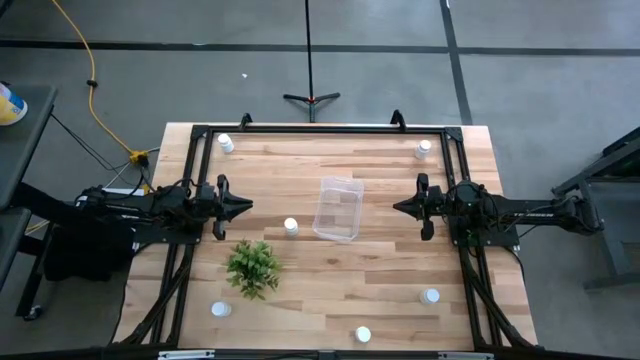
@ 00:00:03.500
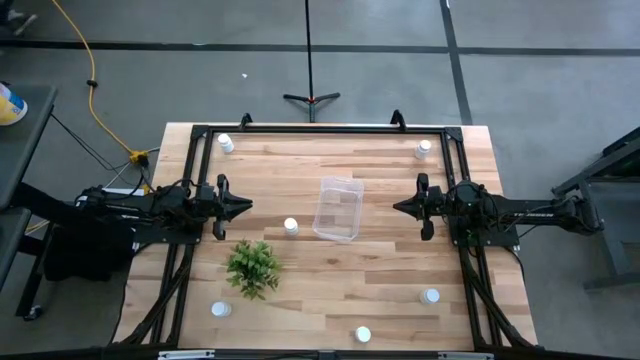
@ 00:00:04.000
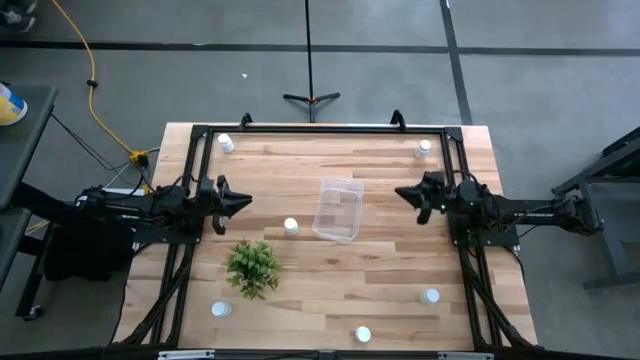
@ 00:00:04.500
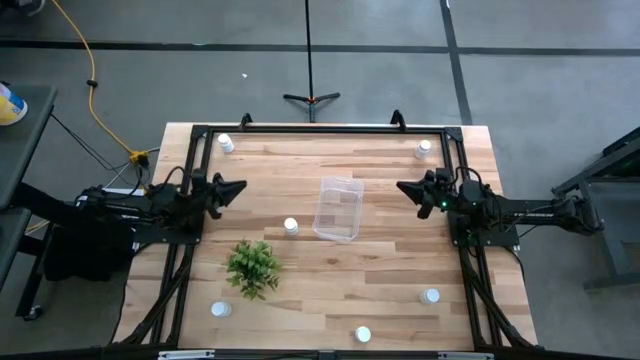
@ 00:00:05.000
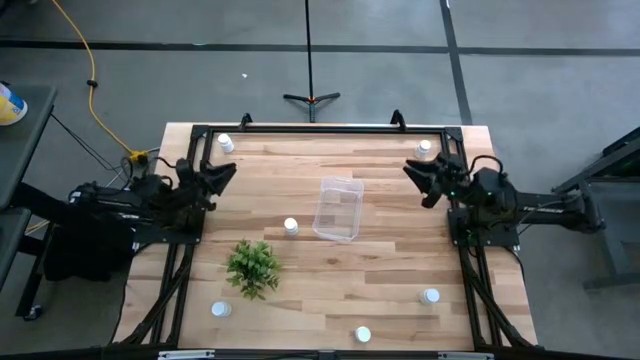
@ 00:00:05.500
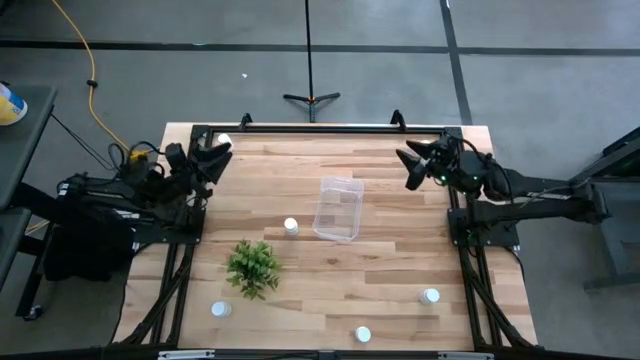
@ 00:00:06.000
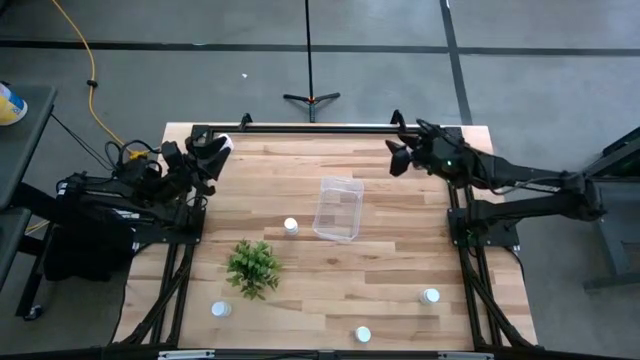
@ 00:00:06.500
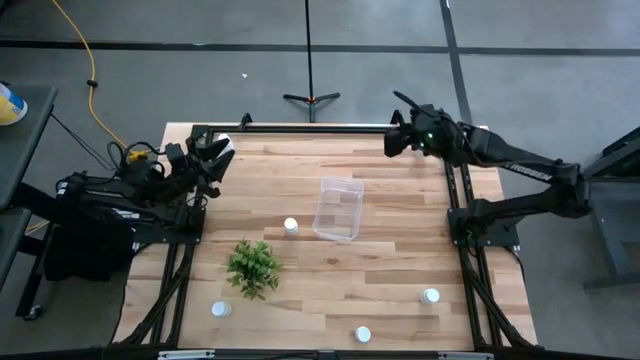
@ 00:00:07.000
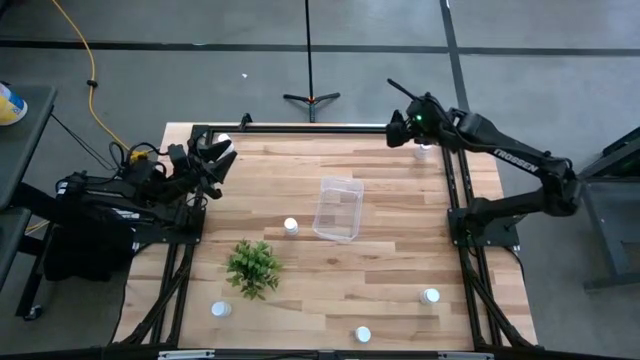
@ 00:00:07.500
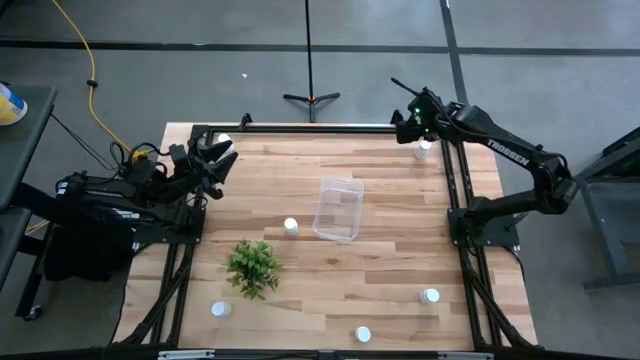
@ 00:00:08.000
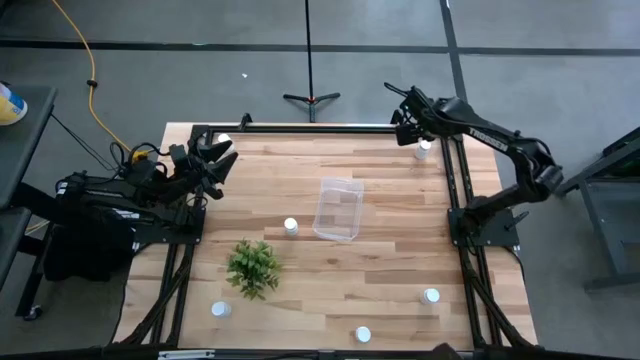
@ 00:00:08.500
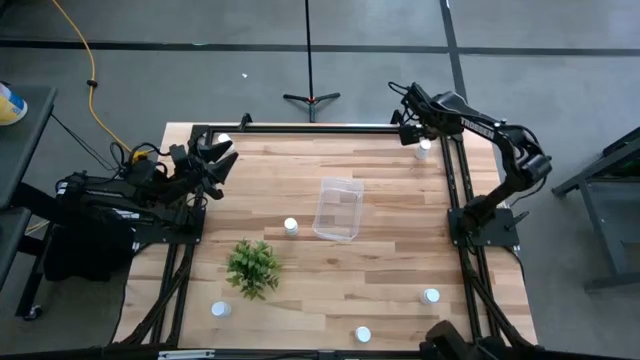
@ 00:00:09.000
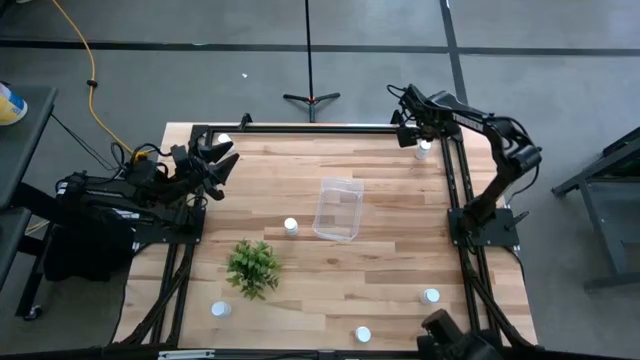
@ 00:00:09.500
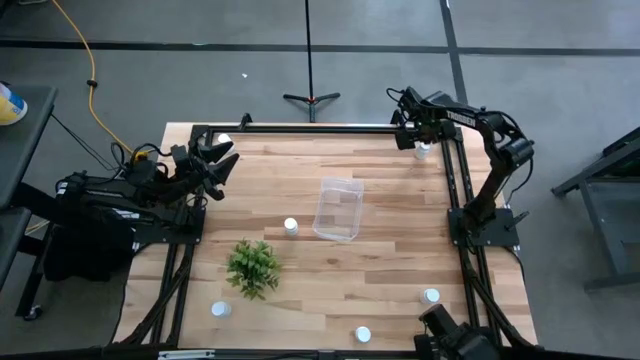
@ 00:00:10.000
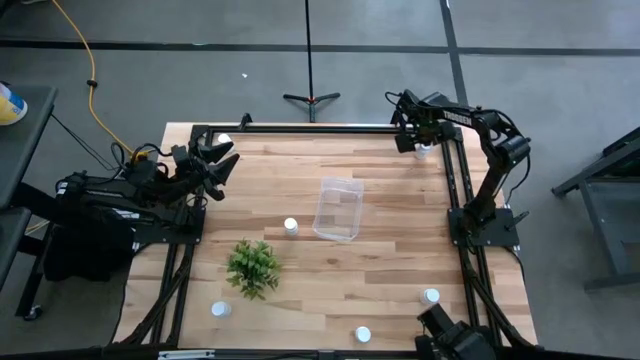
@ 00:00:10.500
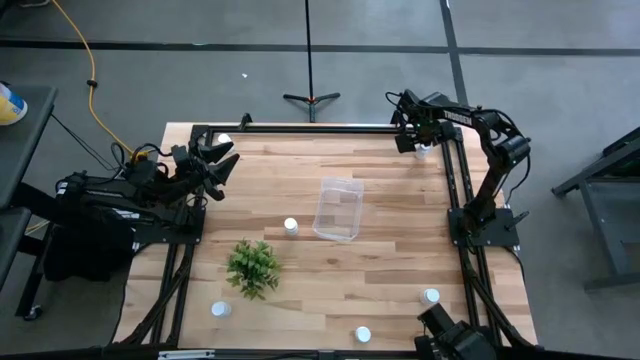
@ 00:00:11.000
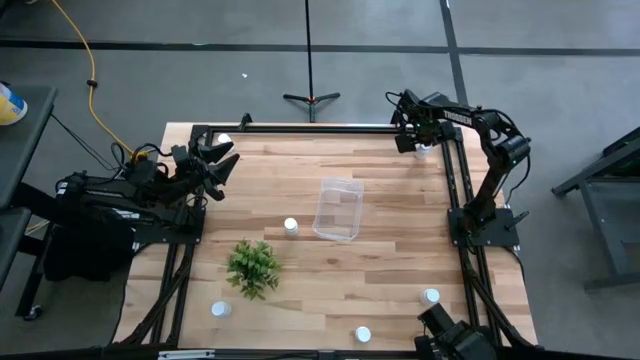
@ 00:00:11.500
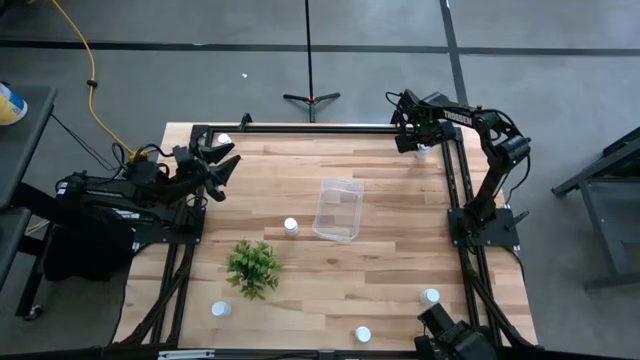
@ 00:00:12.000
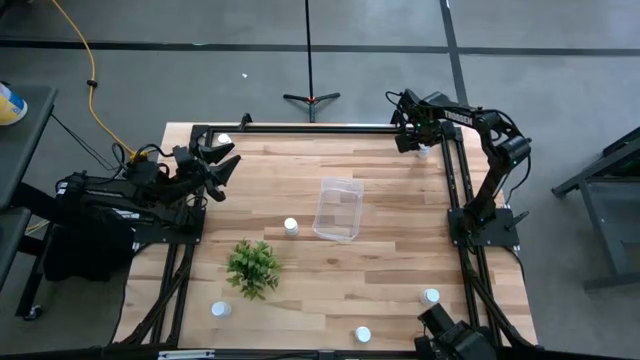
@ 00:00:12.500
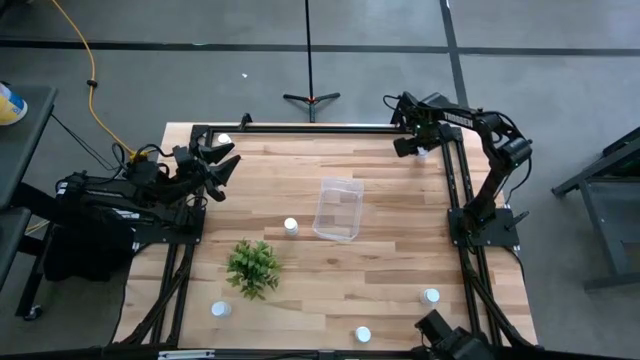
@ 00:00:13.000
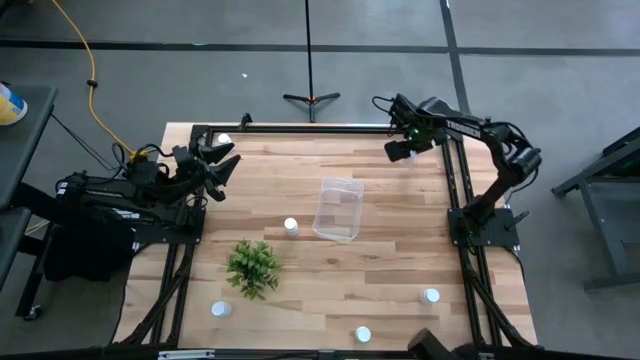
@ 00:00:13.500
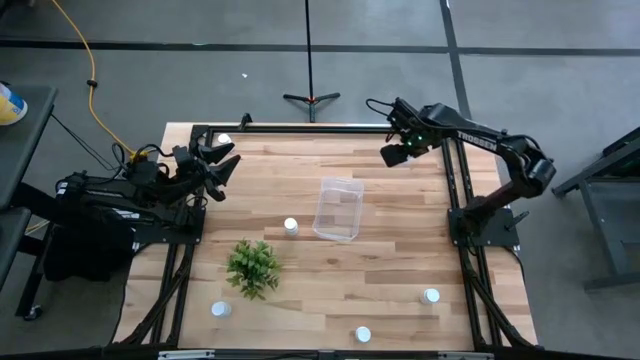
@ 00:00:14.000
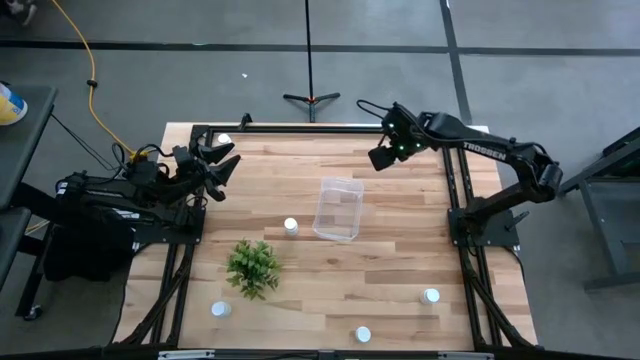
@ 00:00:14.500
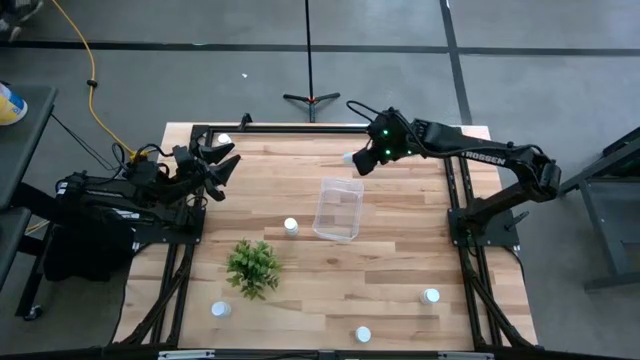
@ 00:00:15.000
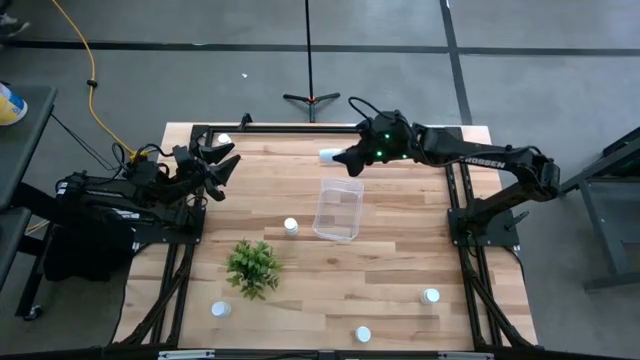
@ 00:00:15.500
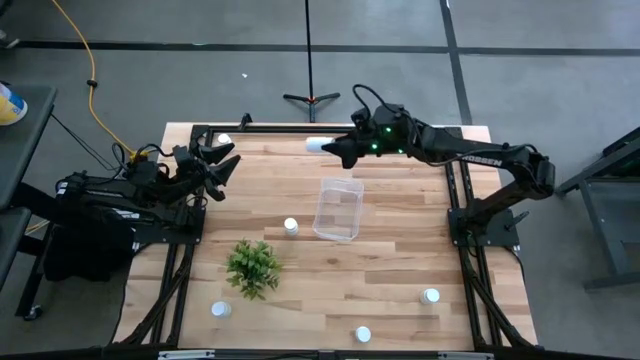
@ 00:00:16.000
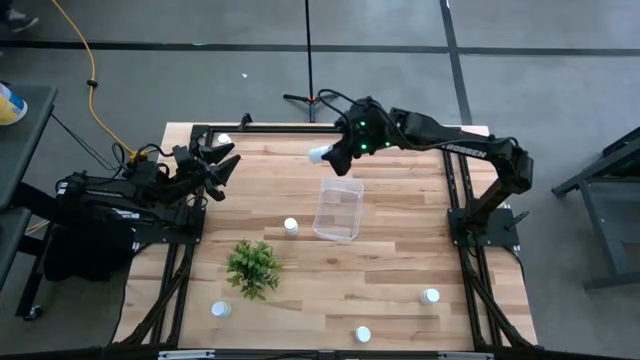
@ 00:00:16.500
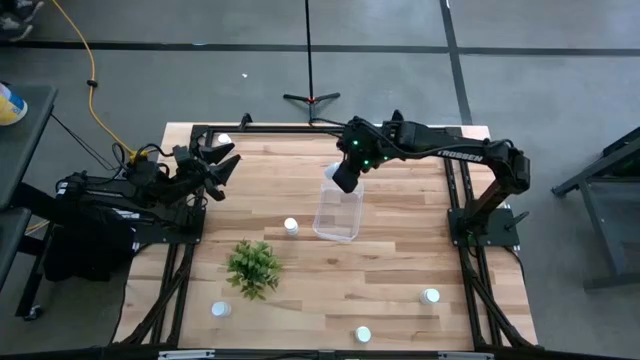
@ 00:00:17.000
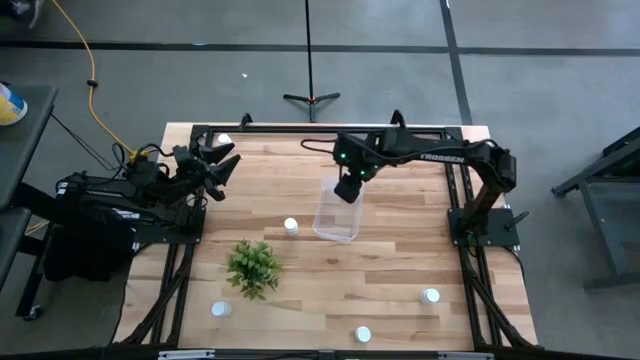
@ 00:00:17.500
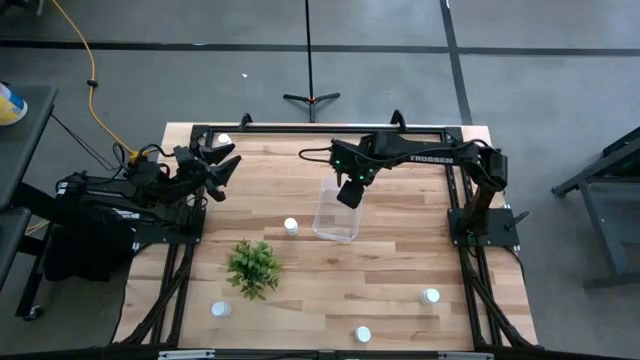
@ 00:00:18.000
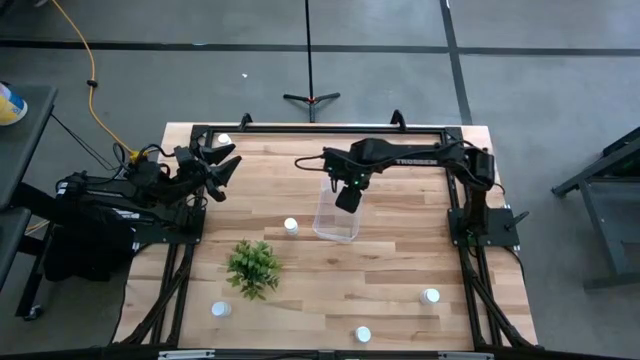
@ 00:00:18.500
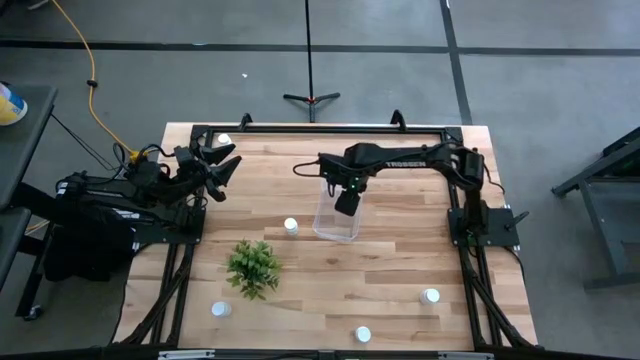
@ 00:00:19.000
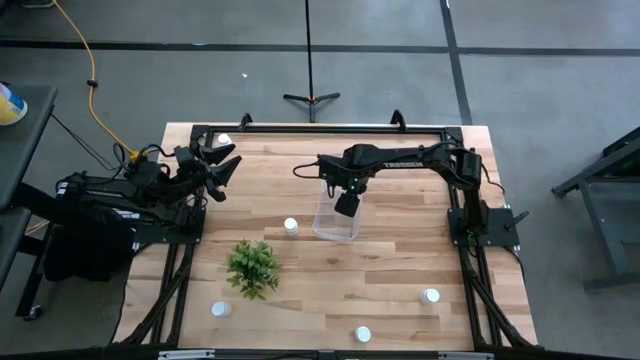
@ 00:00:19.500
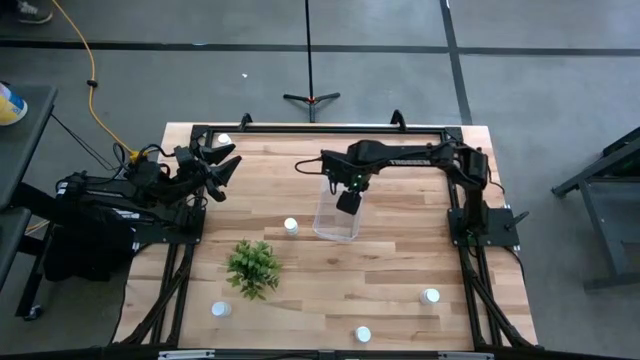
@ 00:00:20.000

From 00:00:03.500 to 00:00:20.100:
Task: Pick and place pill bottles into a basket
Put the white medicine bottle into the transparent bin
